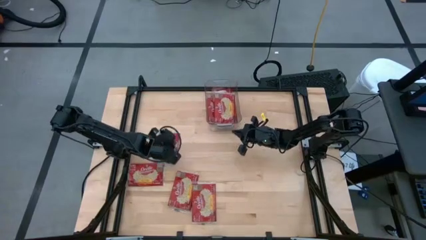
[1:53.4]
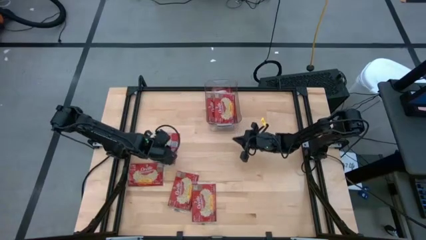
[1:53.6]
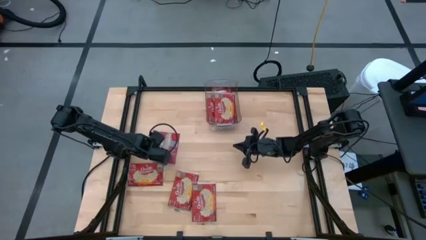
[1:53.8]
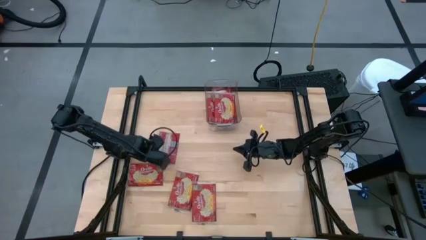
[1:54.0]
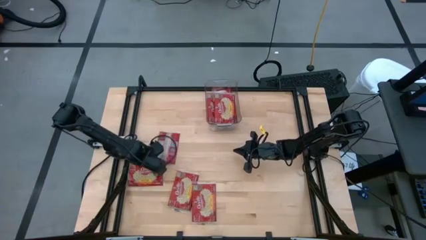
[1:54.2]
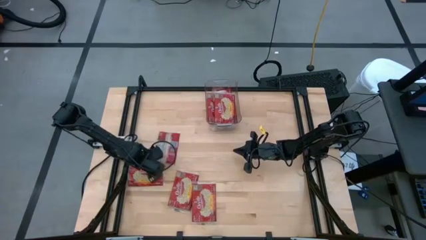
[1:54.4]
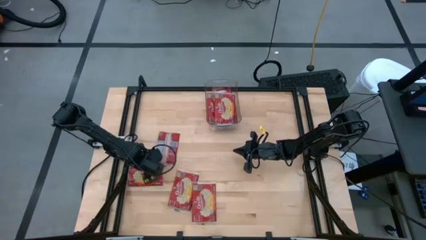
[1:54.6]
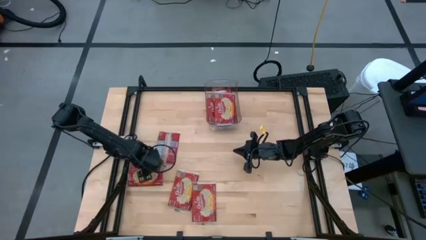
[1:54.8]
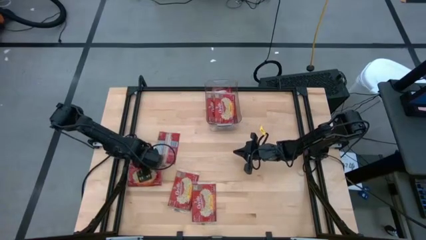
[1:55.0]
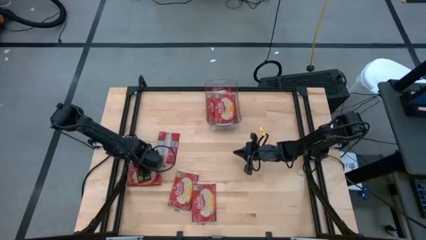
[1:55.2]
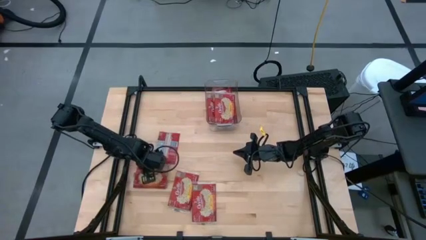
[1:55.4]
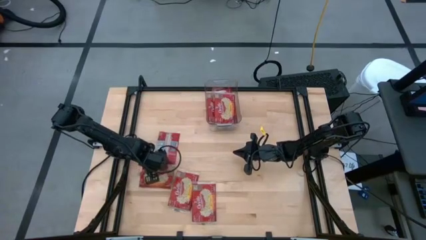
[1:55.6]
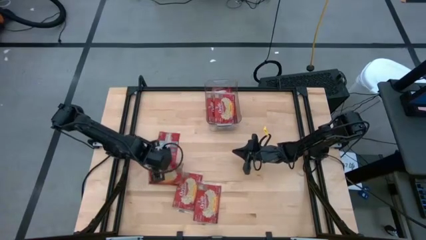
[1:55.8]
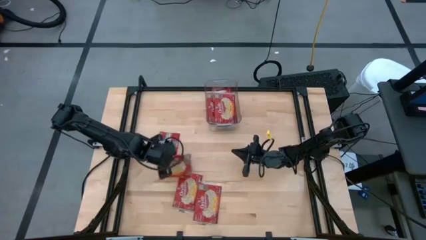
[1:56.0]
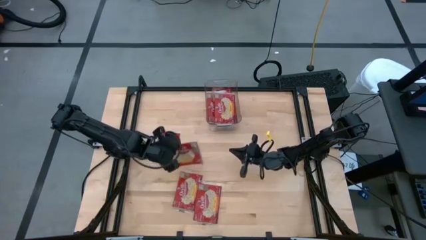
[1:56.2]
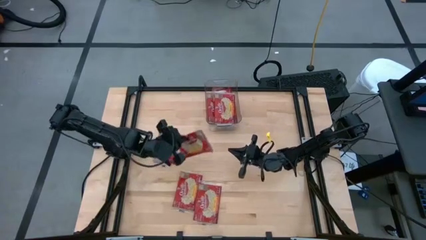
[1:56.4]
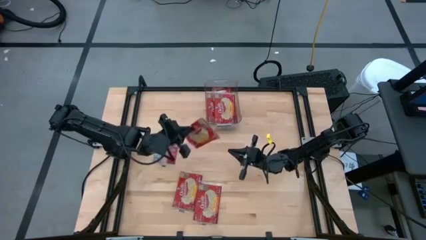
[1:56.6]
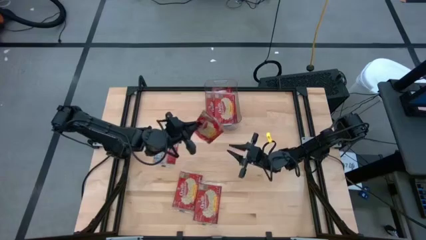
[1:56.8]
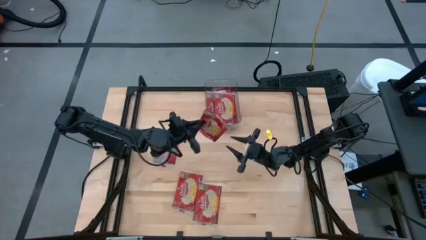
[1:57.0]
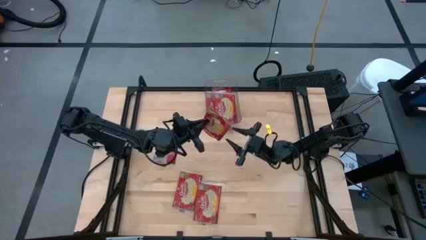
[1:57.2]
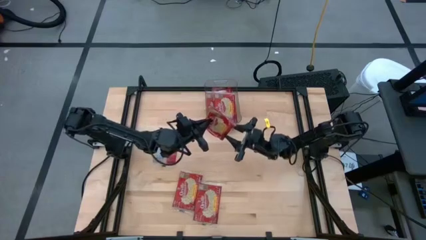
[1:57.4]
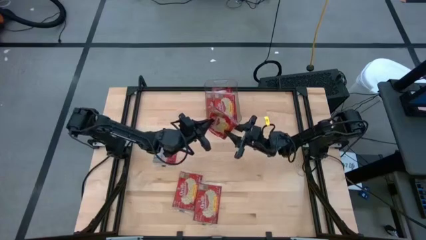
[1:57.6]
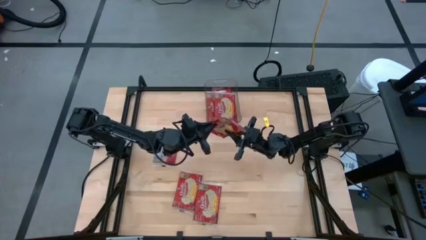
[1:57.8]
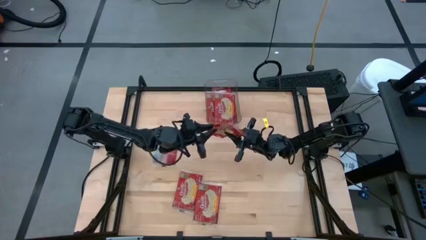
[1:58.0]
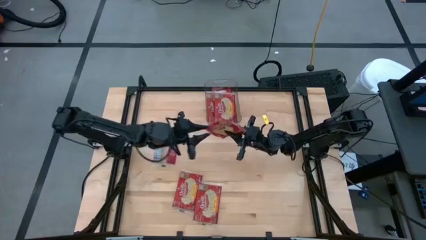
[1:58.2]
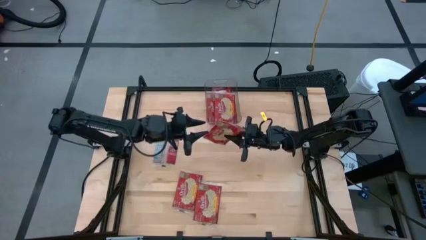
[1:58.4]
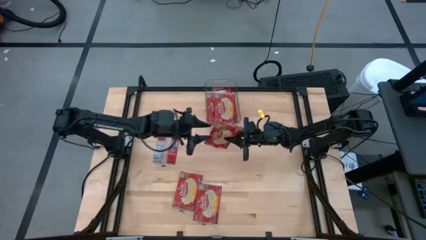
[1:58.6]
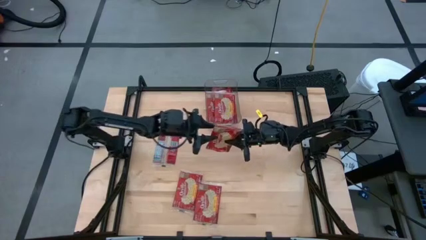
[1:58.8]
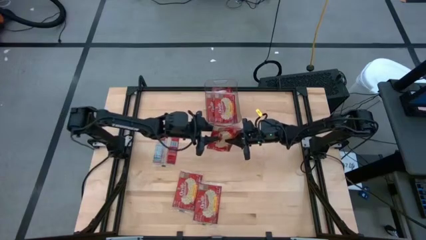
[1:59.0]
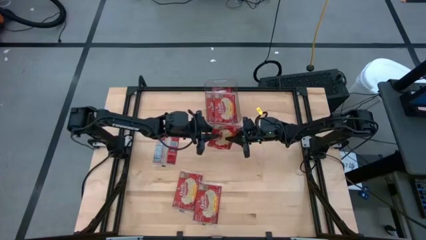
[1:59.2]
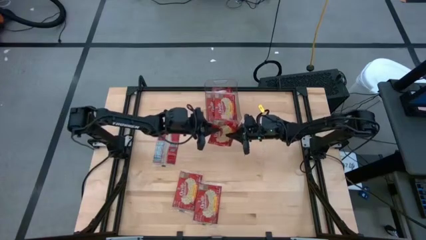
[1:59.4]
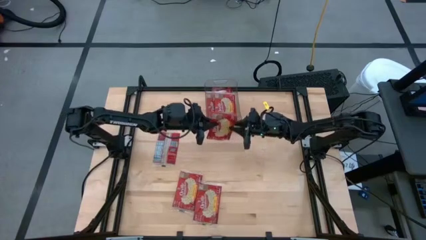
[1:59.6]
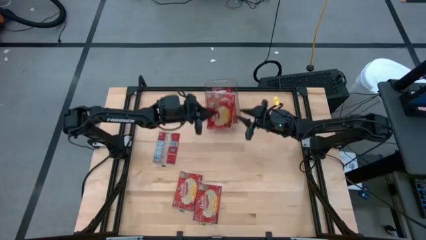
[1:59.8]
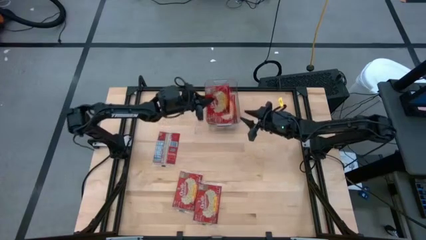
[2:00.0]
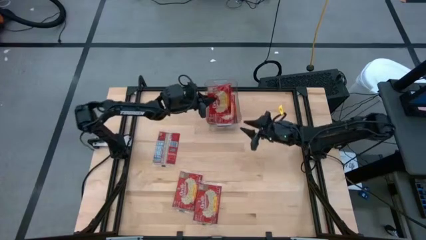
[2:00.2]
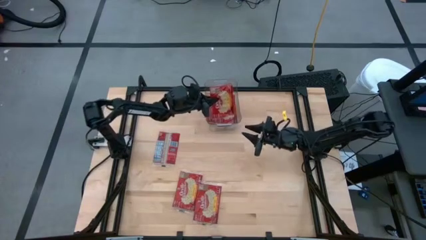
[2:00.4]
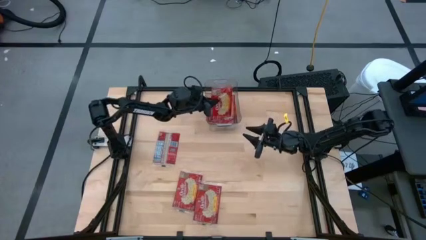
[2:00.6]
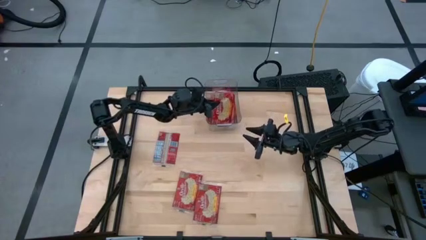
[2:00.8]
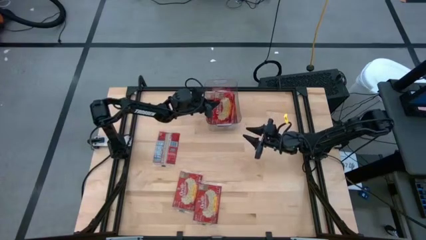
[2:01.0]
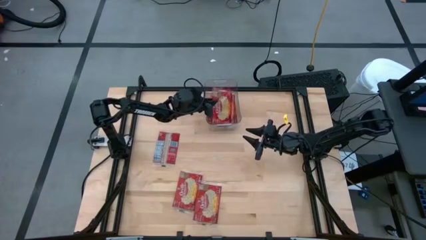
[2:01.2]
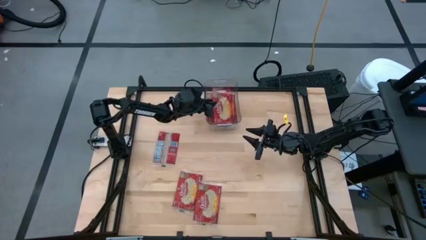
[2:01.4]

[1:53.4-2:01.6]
Task: Sort popcorn bags into baskets
Put the red popcorn pack into the transparent bin

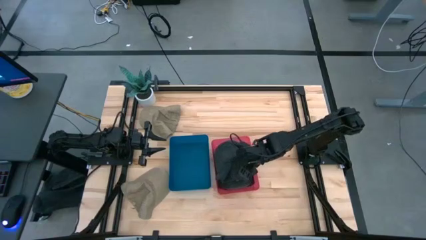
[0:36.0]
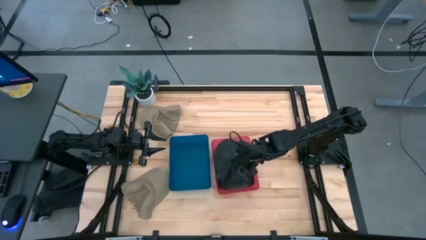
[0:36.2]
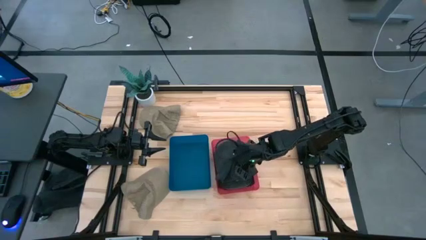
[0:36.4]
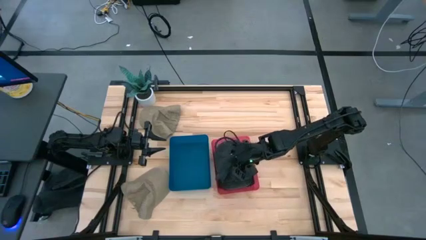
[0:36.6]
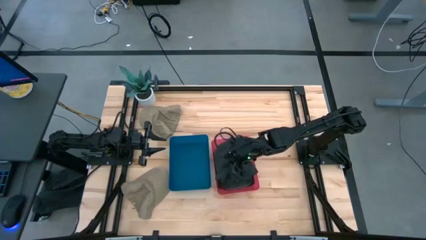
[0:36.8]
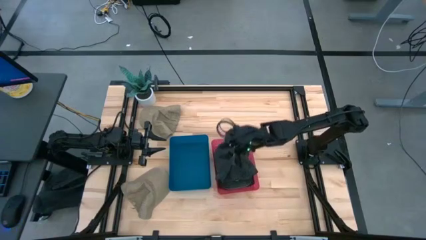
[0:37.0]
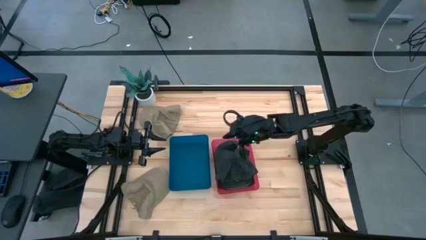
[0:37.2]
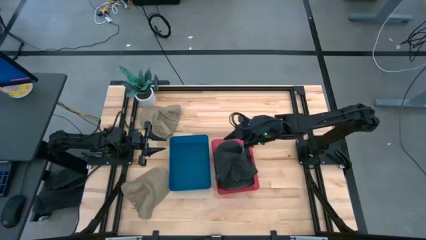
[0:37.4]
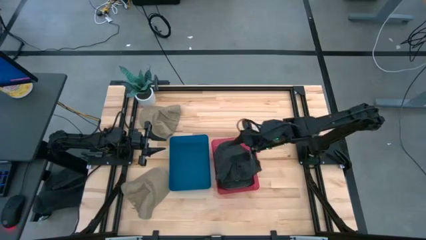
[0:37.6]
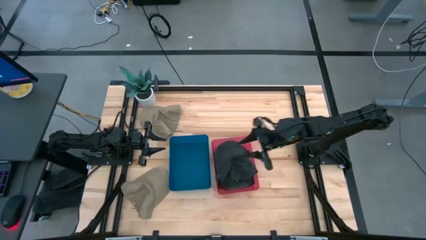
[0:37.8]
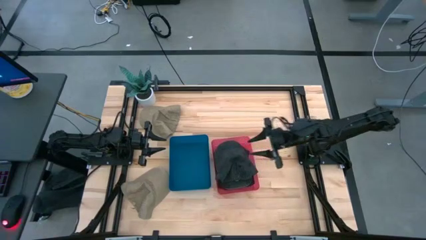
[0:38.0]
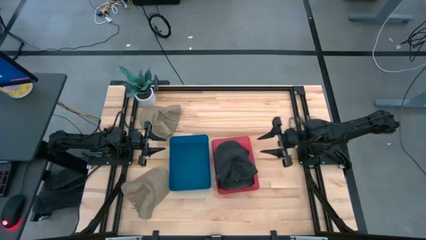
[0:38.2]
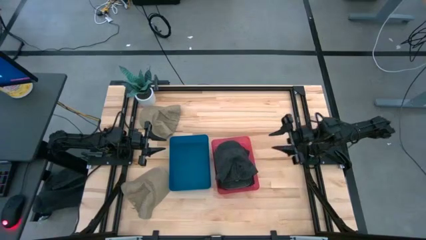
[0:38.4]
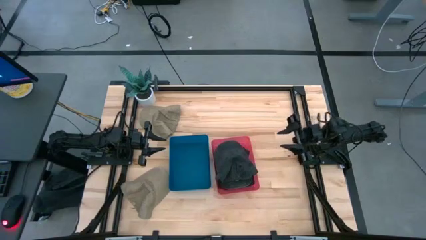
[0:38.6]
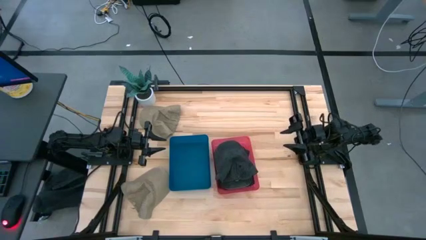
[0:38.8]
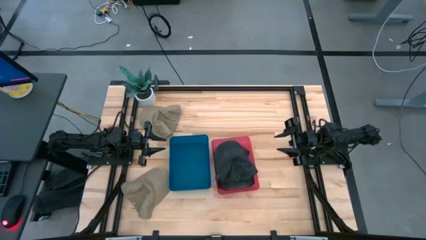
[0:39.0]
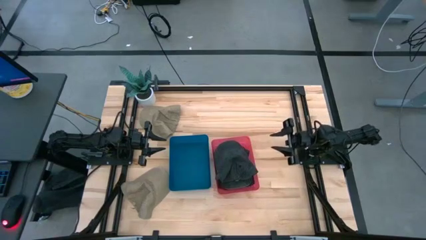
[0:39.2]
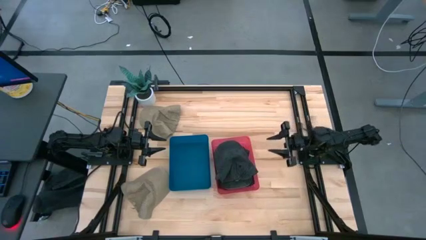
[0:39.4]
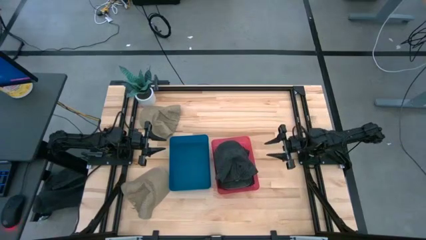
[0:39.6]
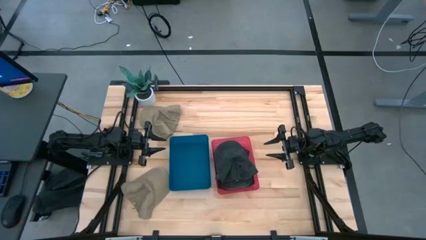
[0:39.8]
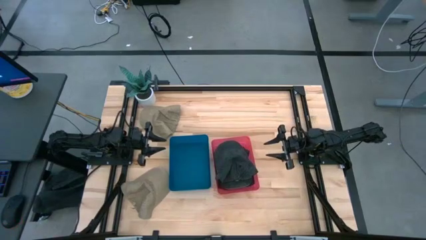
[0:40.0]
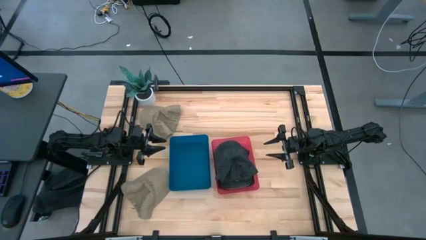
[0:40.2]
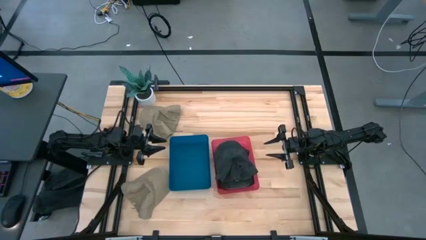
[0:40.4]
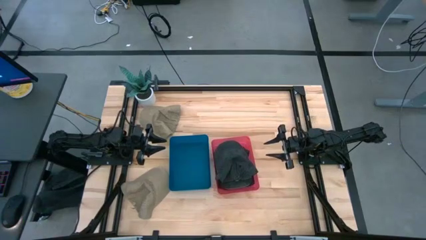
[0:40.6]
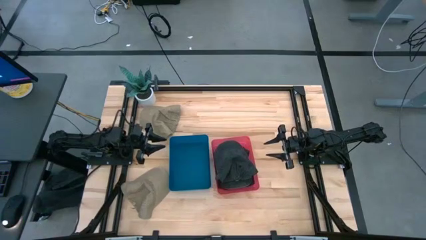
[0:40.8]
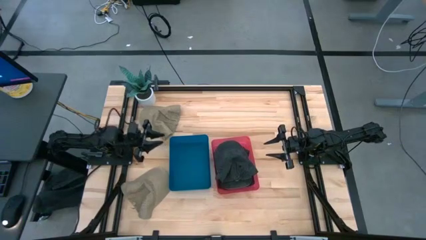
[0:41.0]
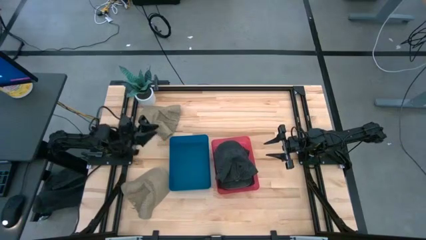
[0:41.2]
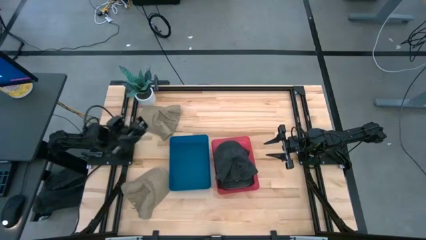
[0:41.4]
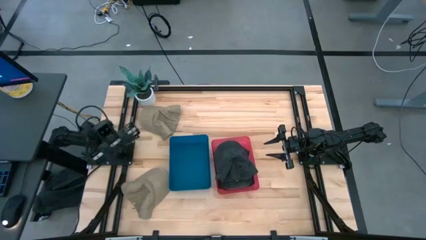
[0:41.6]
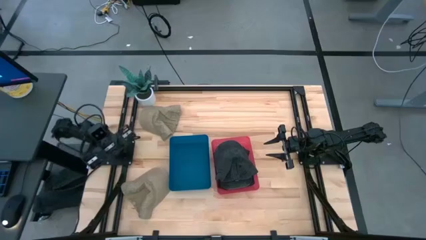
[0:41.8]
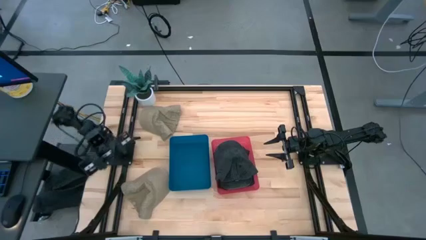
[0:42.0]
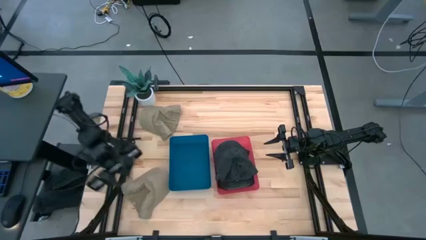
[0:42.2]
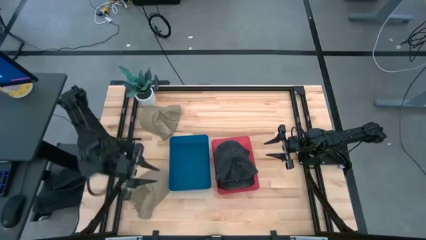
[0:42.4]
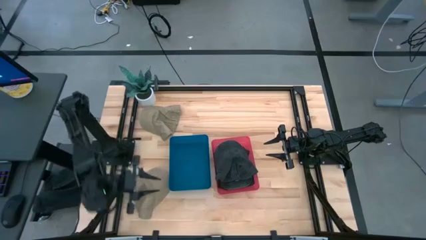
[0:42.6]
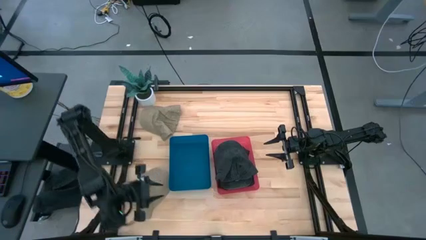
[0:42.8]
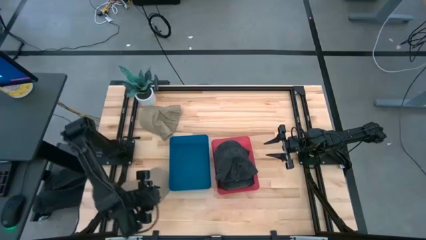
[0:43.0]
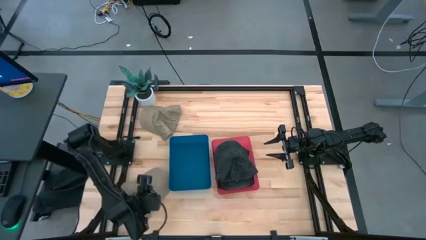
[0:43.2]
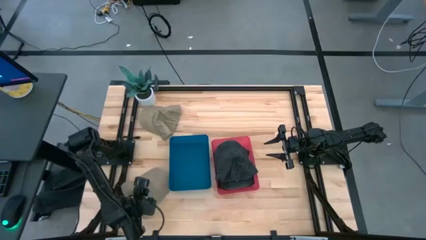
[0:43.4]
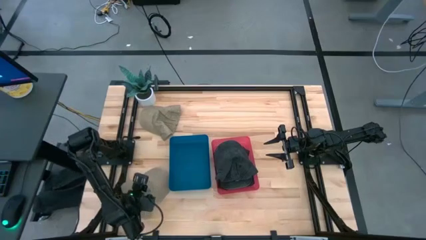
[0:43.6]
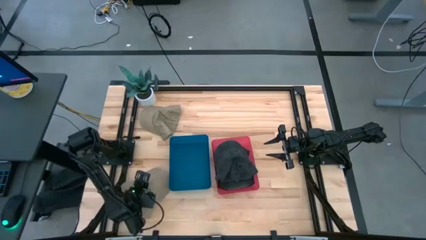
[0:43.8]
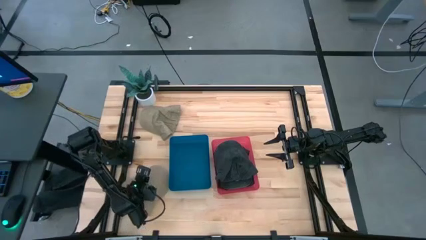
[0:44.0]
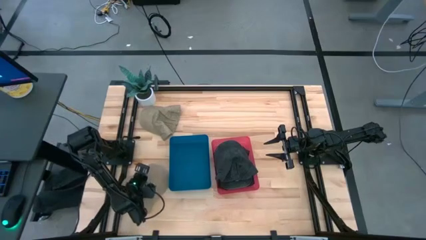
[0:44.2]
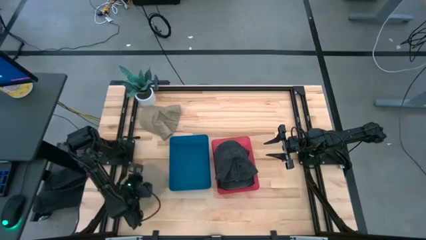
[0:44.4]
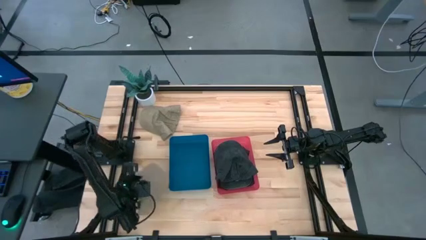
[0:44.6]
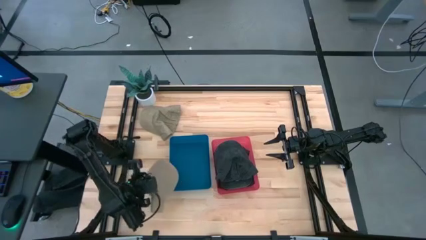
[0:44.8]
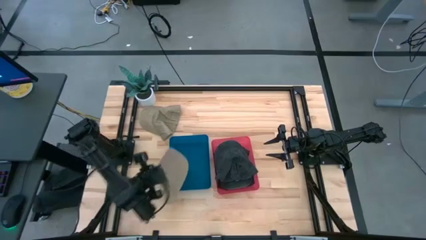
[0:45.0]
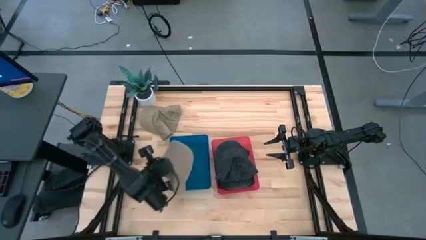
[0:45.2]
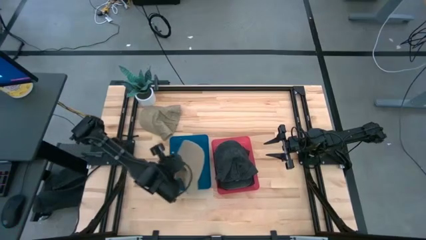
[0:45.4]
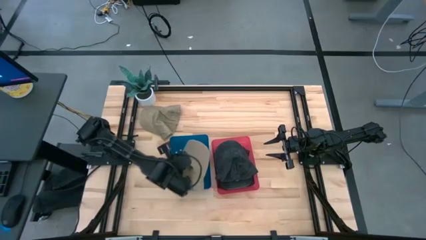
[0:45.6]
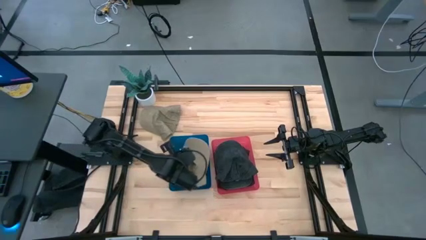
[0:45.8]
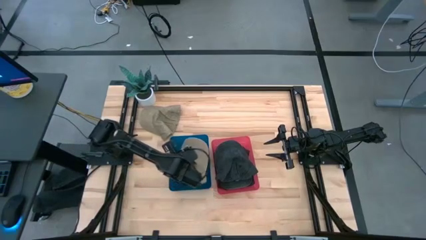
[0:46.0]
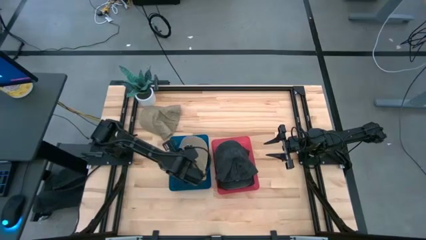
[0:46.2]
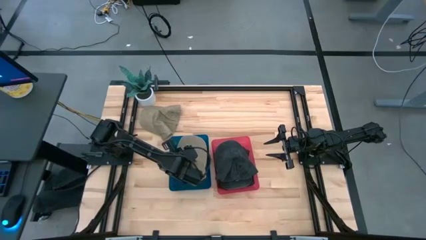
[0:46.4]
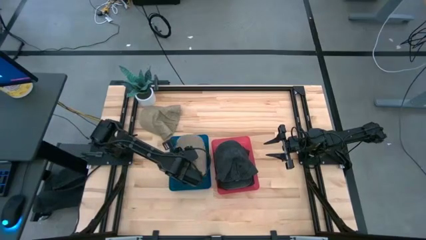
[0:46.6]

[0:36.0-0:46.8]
Task: Pick & Place hat
Put the bottom brown cap into the blue bin
